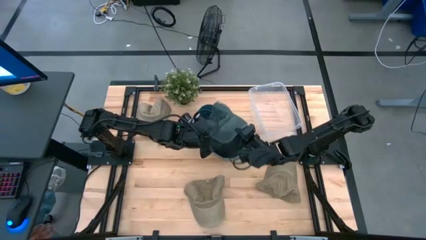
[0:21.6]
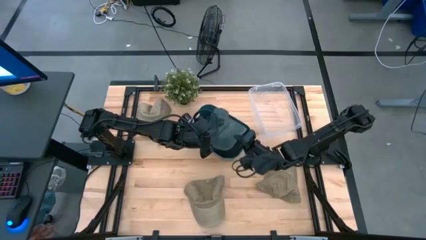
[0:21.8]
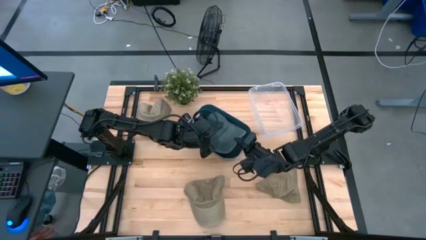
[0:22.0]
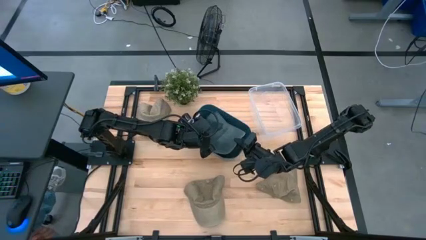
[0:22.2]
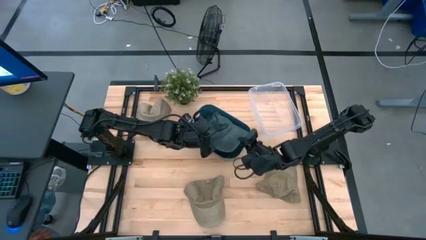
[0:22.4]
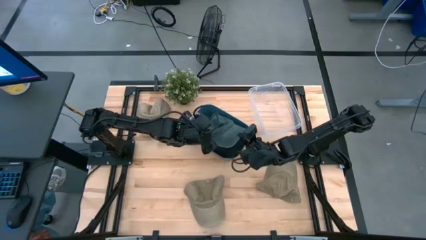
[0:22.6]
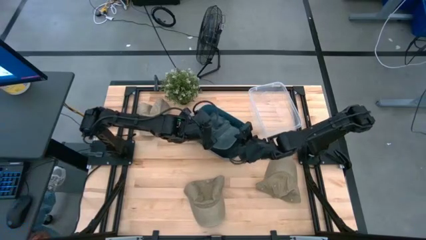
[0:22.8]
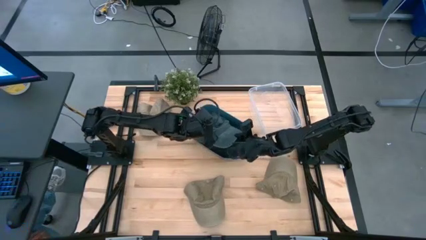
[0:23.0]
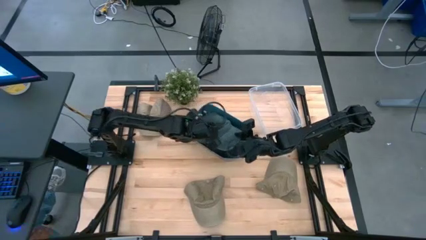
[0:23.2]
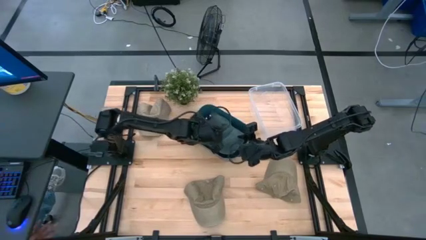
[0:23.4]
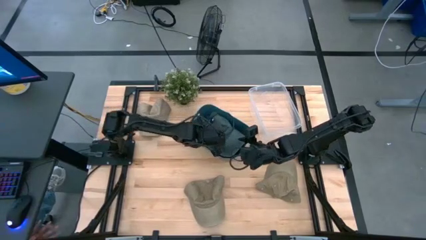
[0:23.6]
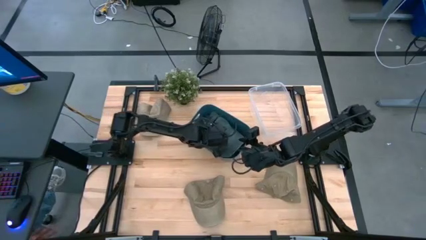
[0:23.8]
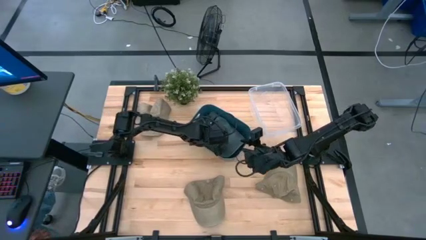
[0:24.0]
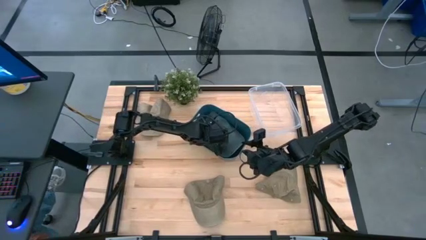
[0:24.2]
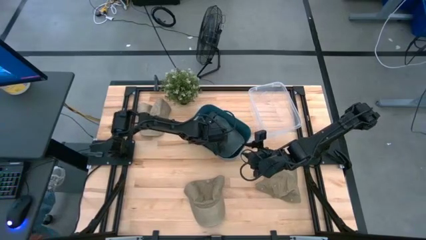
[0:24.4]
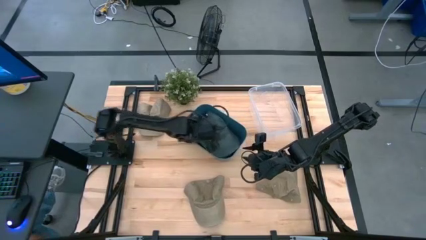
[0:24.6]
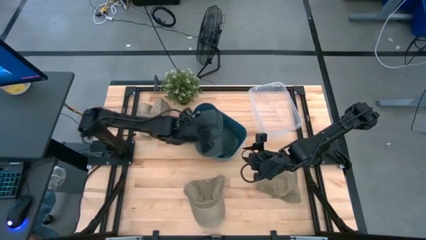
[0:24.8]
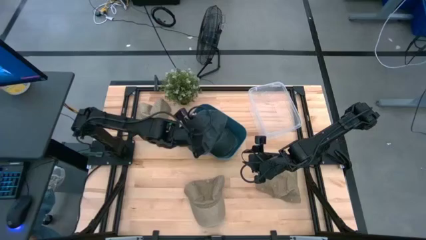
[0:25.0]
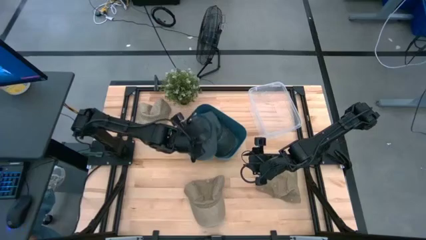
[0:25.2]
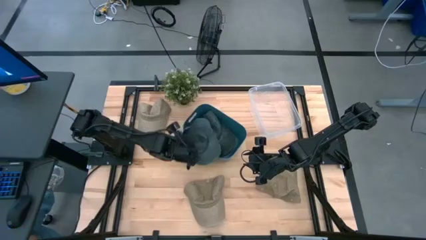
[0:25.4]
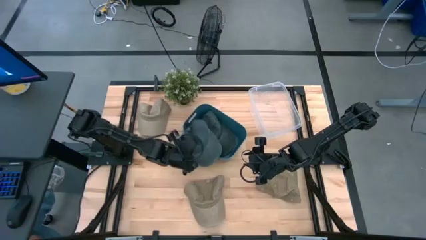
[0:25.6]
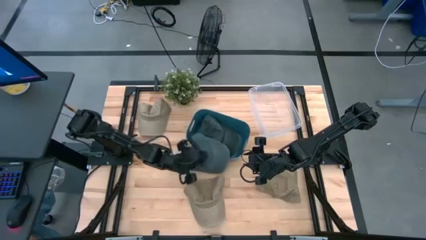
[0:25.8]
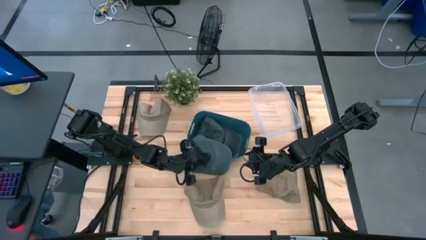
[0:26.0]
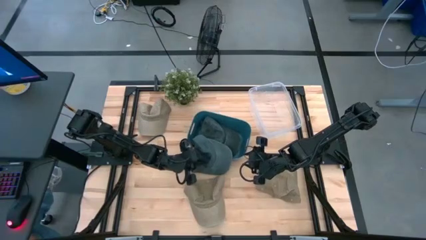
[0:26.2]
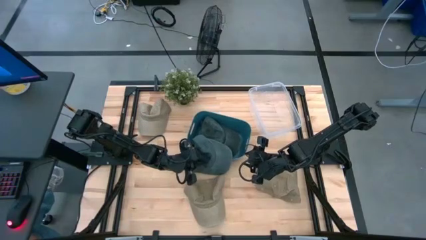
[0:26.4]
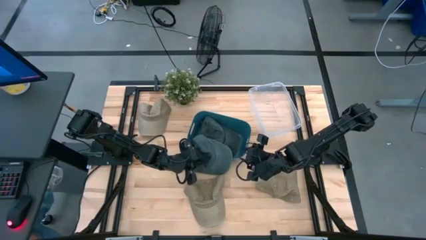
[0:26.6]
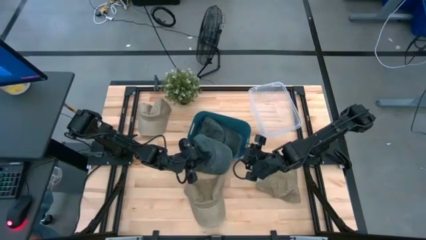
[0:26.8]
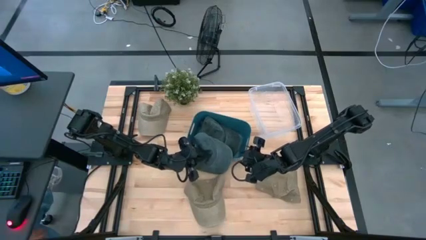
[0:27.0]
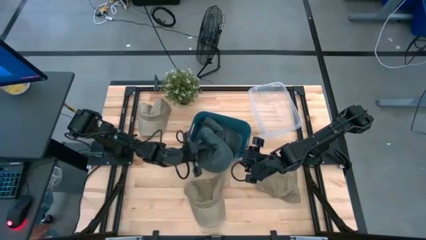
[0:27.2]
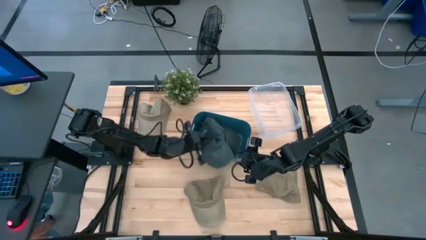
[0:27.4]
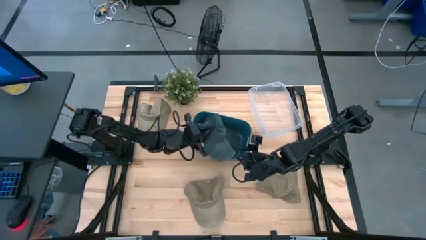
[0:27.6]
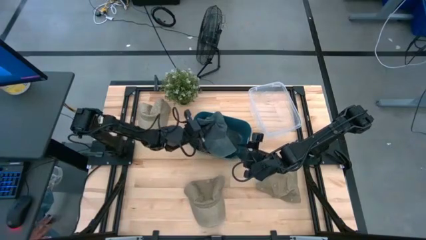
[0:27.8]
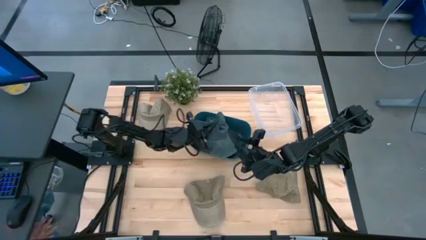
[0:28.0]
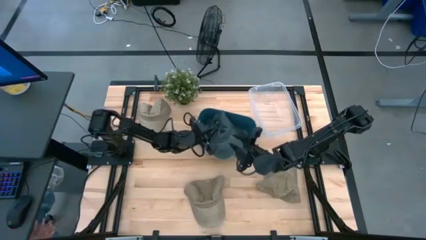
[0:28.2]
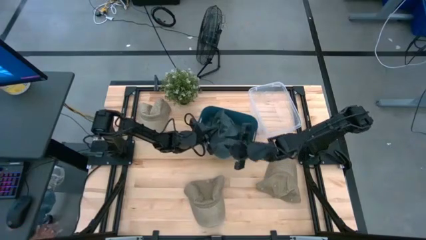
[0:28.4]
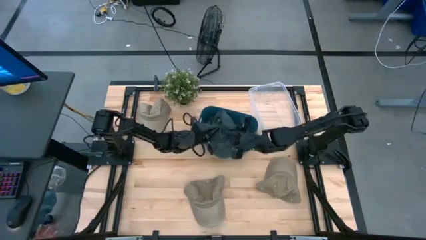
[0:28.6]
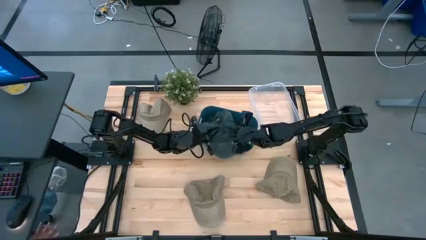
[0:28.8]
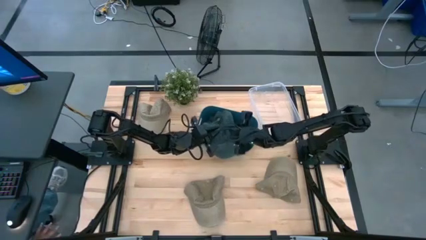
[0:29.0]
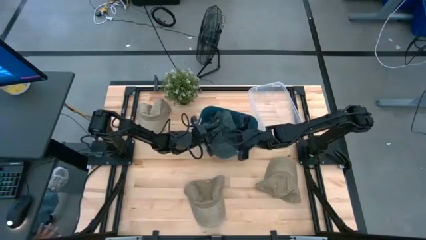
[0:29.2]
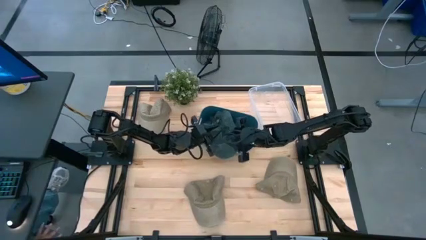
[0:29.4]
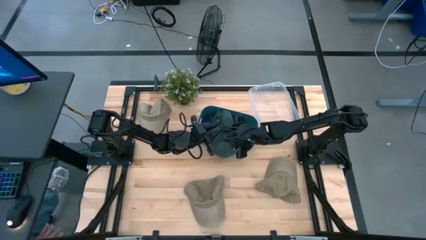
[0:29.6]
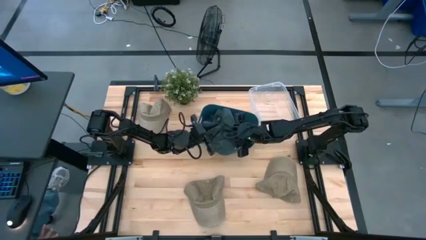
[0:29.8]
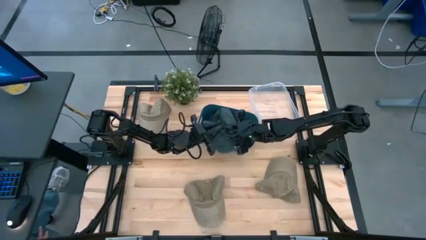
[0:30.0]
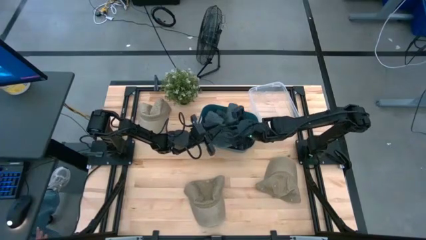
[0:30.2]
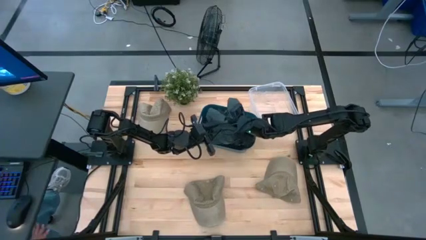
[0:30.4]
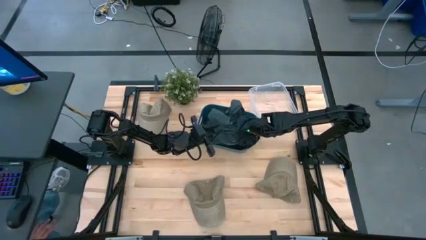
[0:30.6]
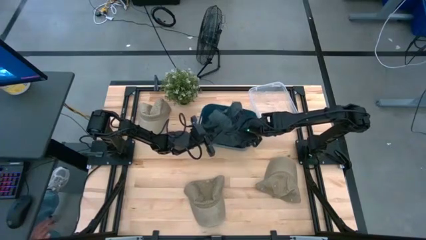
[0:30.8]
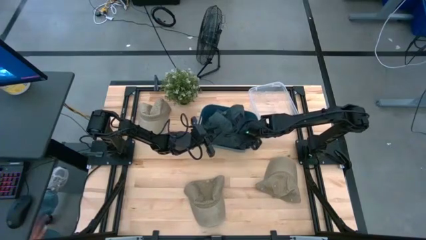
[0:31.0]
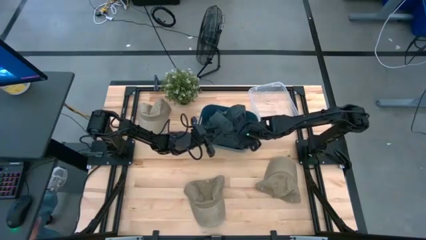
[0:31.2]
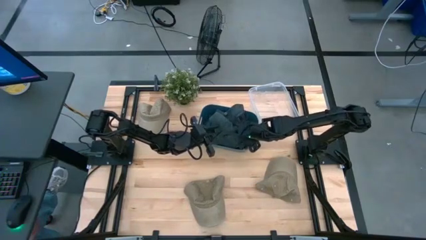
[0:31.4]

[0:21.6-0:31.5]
Task: Pick & Place hat
Put the dark blue cap into the blue bin

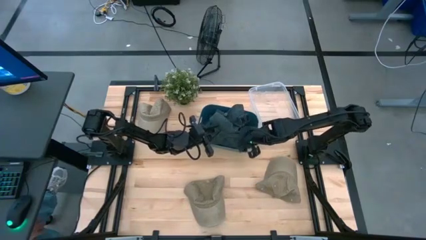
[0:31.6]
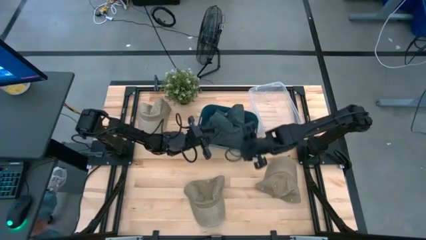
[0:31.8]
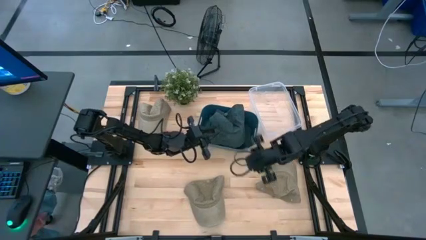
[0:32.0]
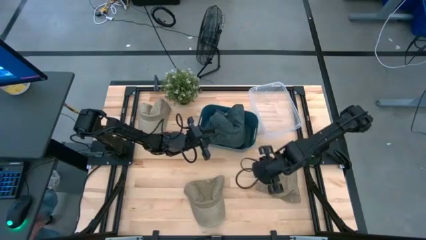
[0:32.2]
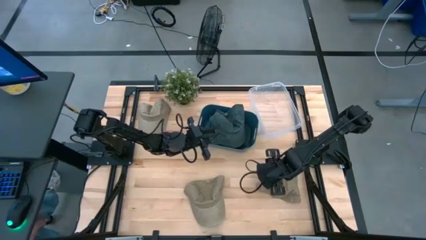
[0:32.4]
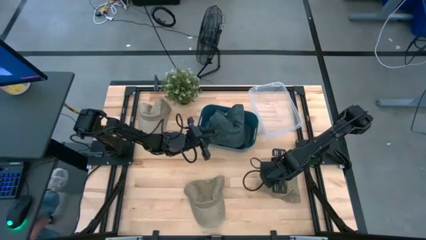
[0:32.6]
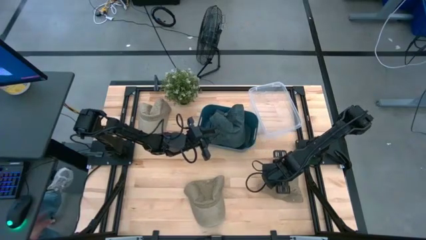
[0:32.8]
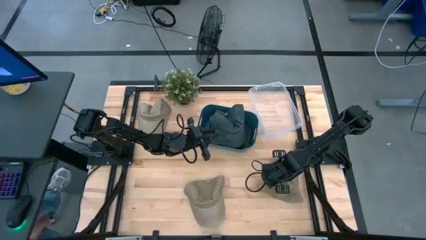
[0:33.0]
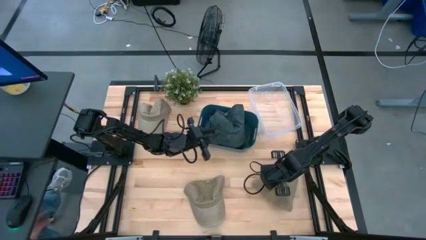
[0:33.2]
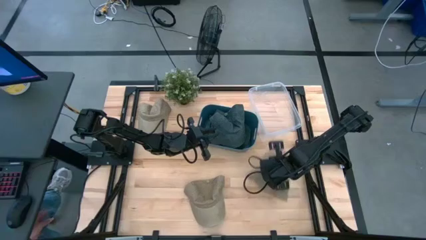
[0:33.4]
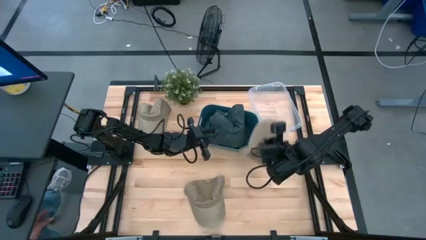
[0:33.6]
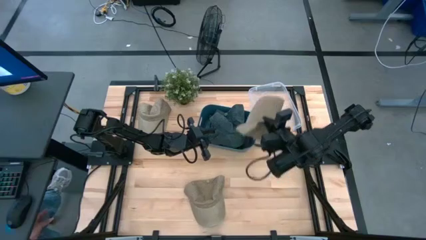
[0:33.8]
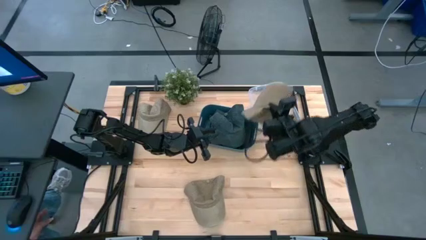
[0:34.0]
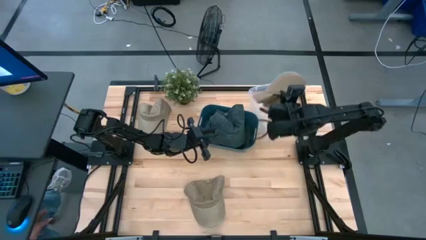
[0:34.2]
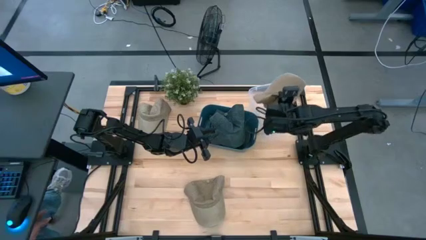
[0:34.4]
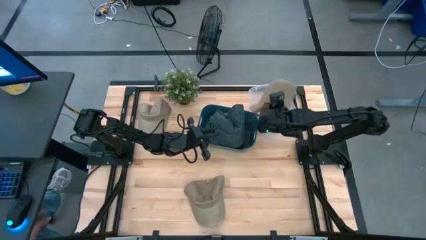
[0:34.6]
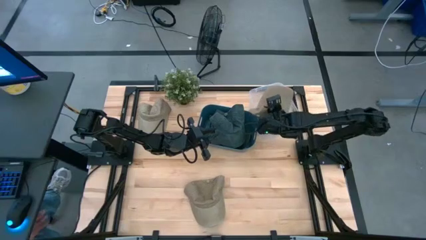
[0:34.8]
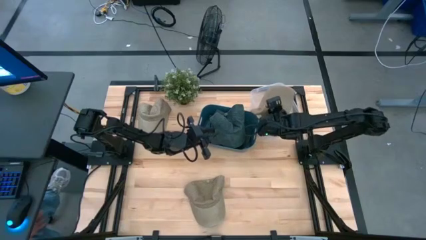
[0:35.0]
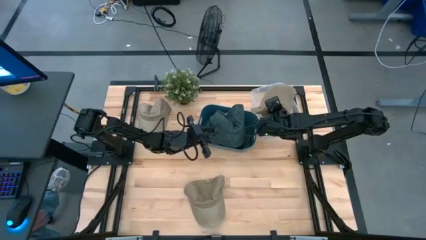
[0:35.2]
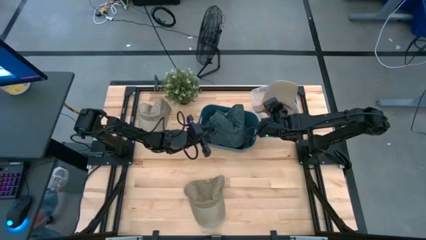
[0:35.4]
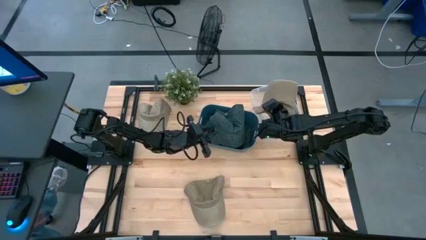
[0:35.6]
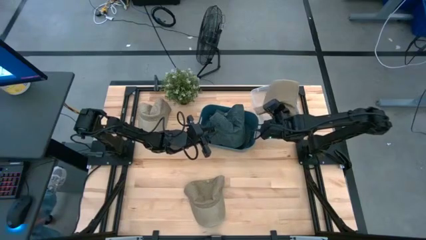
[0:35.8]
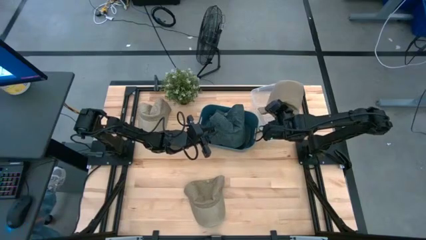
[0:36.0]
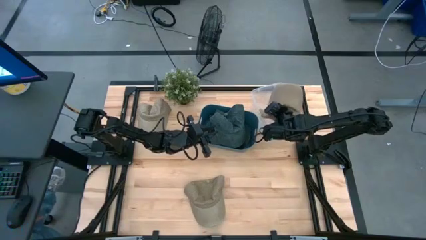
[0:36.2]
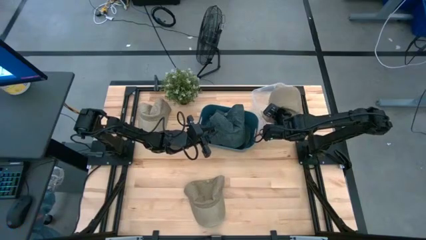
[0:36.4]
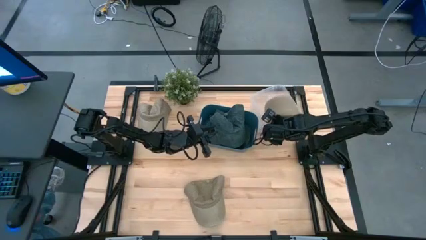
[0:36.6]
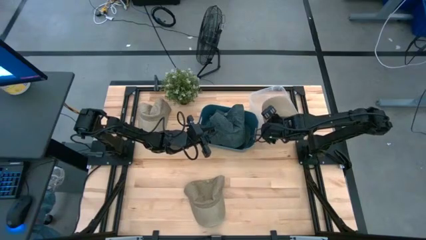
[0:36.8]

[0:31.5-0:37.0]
Put the bottom right brown cap into the transparent bin

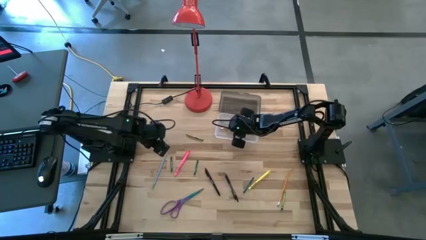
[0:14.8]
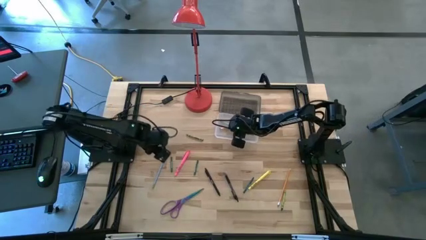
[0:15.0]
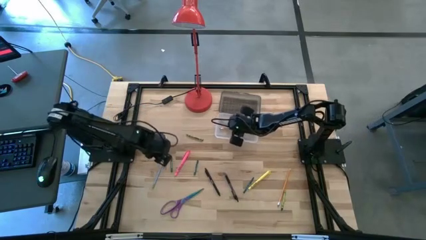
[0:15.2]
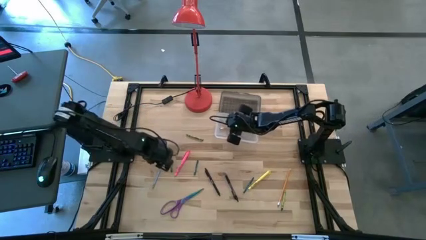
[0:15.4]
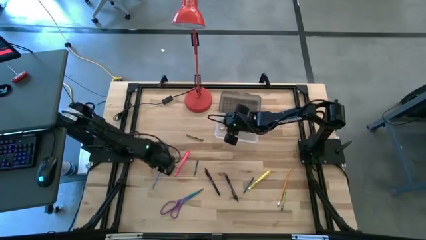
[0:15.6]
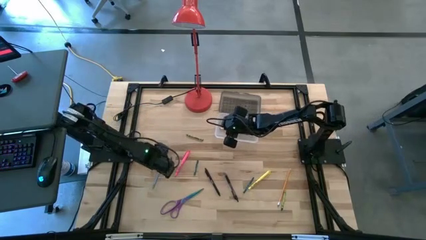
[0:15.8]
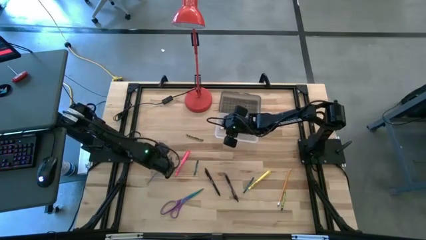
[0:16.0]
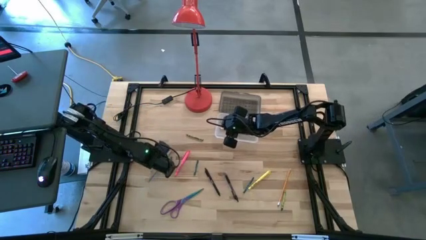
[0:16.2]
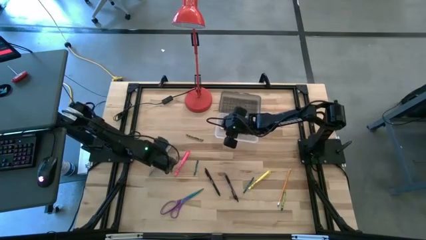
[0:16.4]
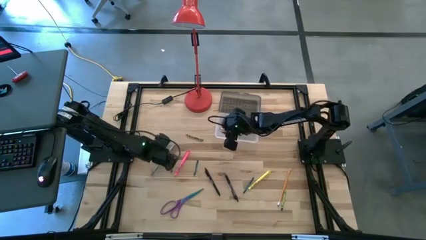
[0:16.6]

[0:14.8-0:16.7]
Task: Pick & place school supplies into a supply box
Put the blue pencil into the black supply box
